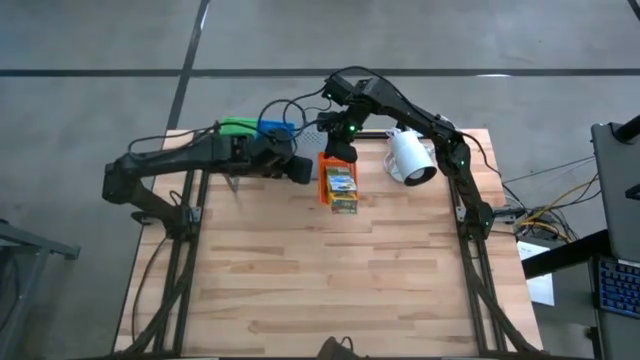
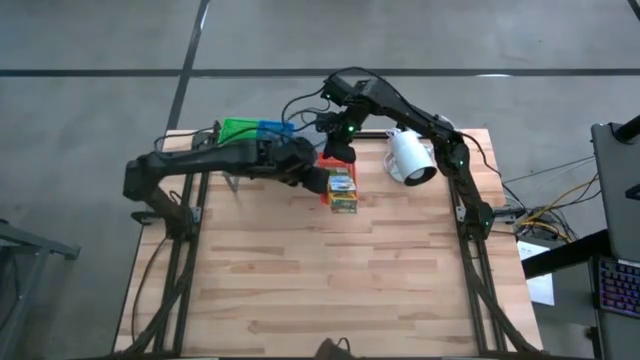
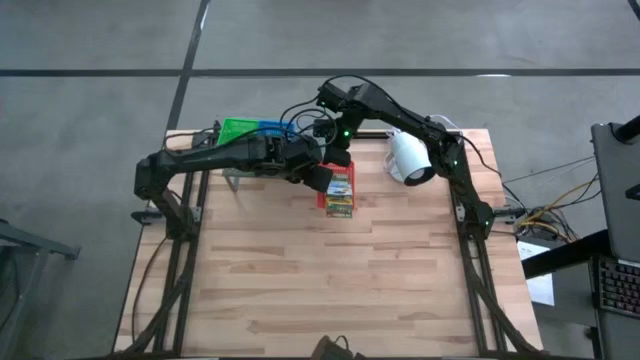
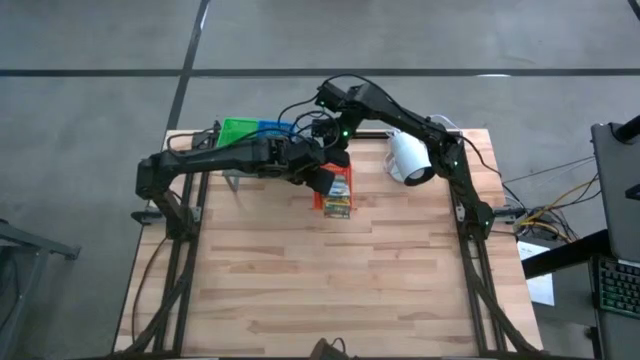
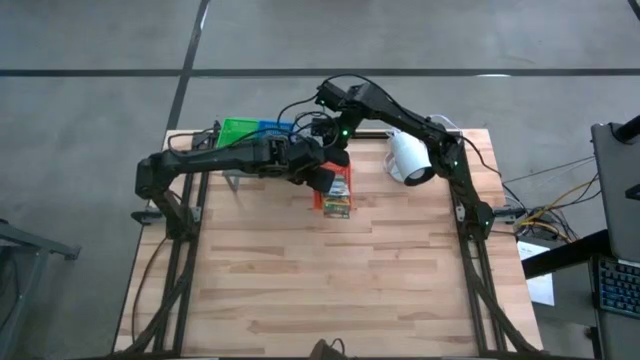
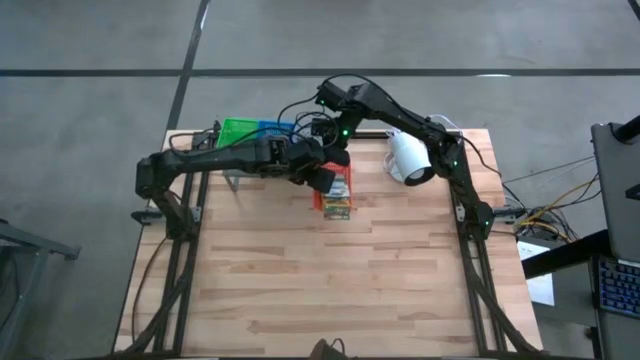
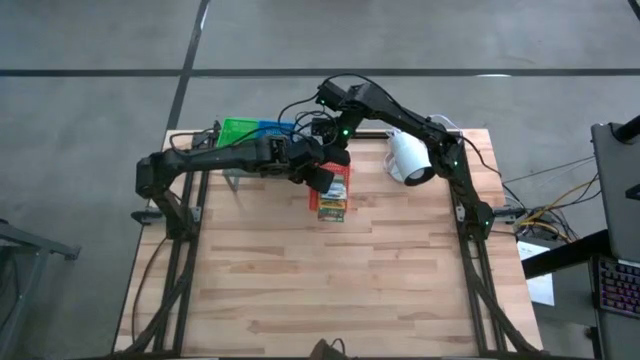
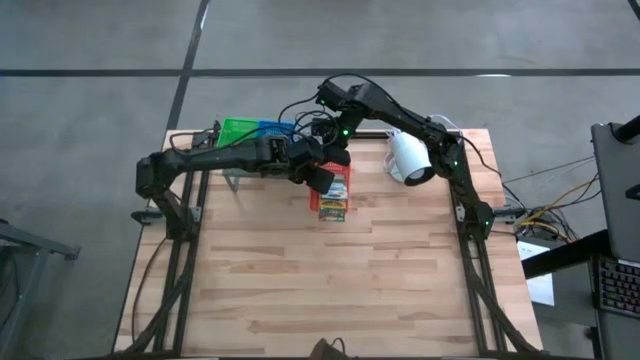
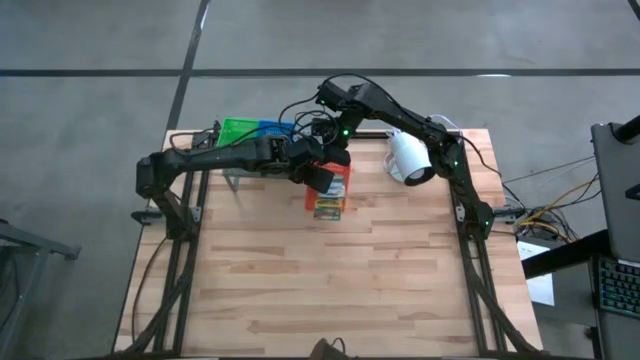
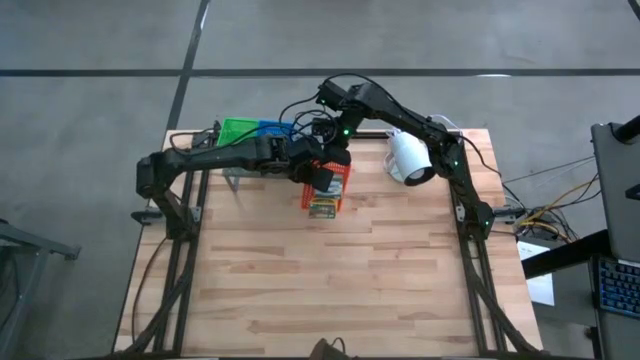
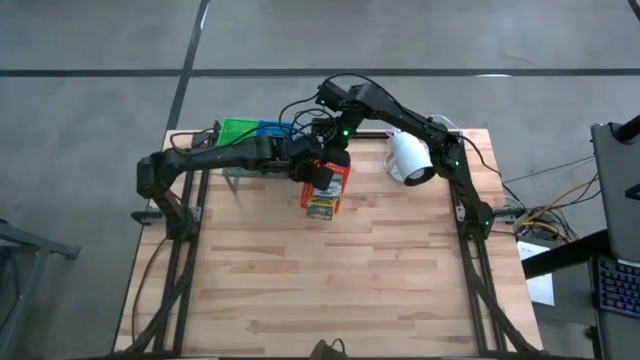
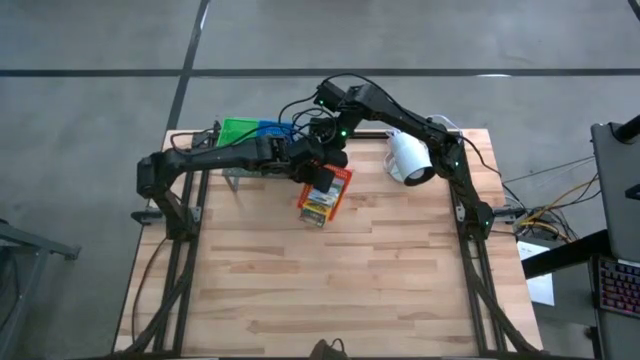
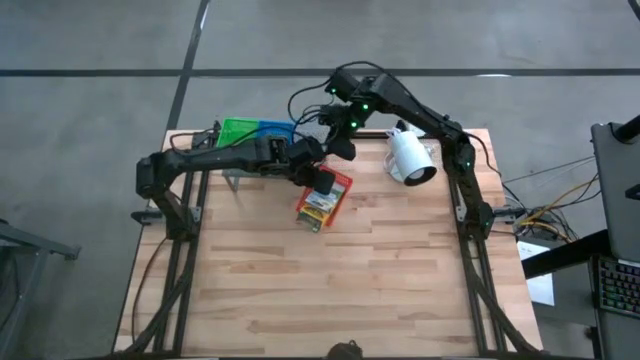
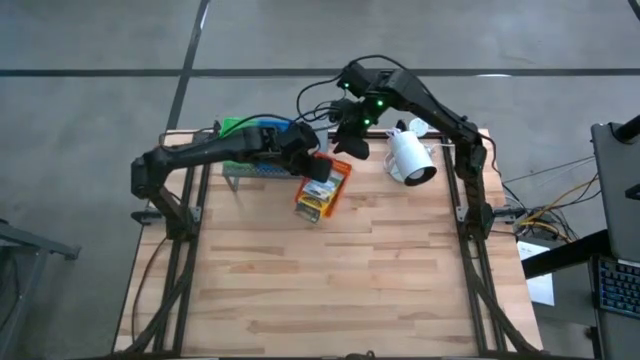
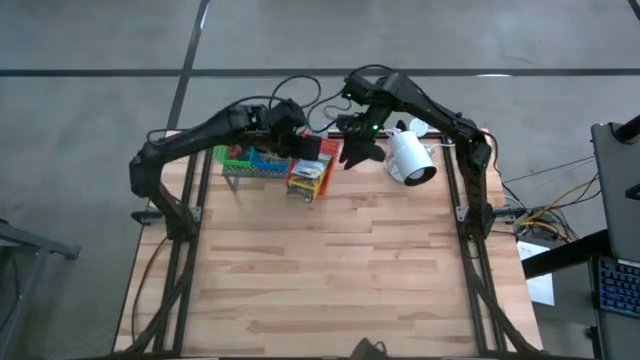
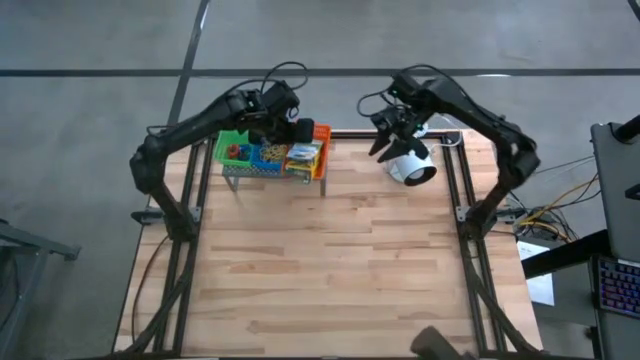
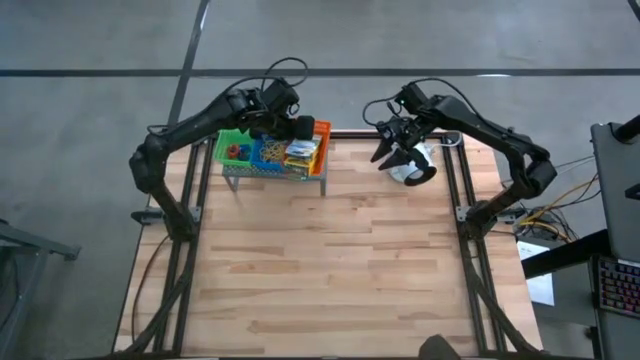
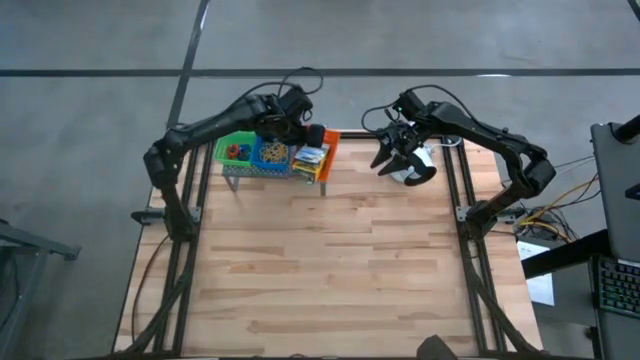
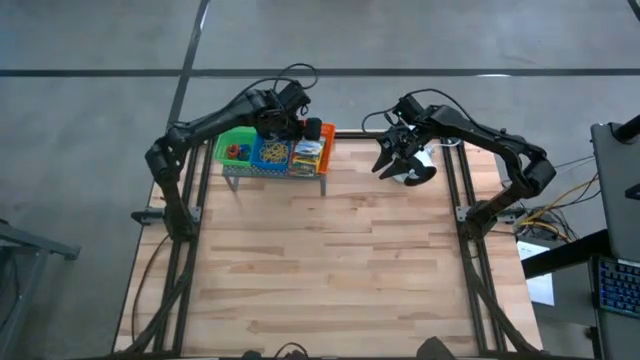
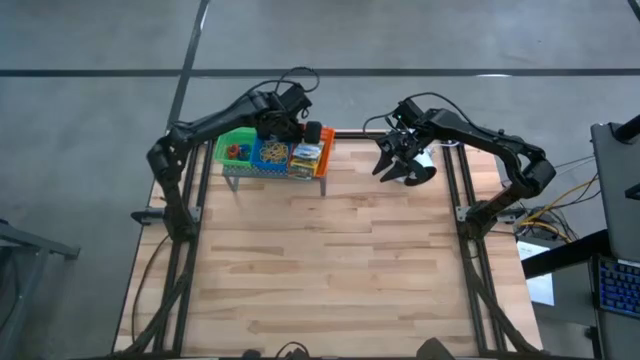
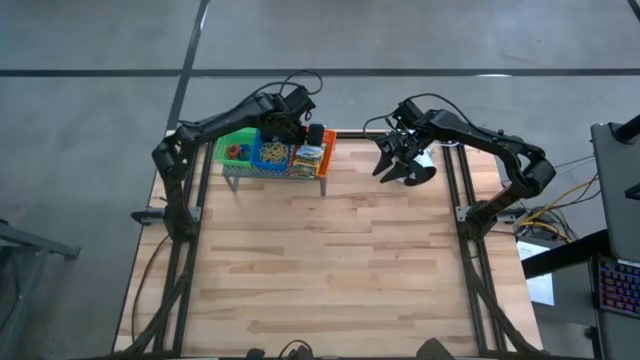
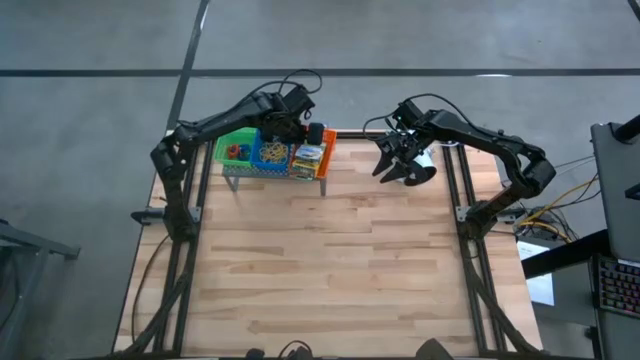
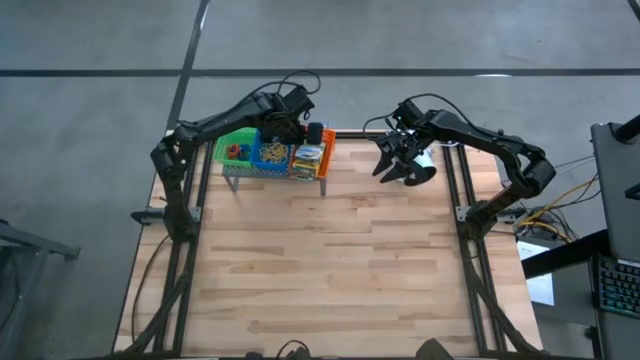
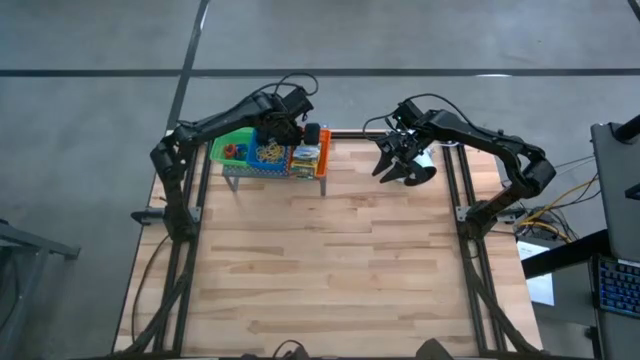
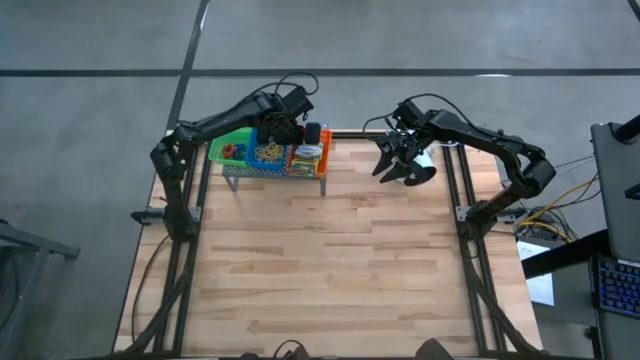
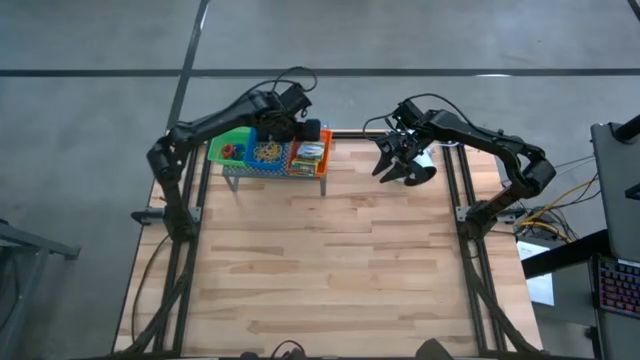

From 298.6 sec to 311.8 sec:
Task: Pick & Place Office Desk Supplies
Put the orange bin on the shelf

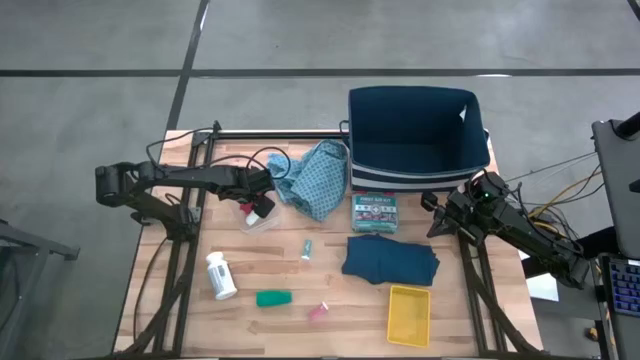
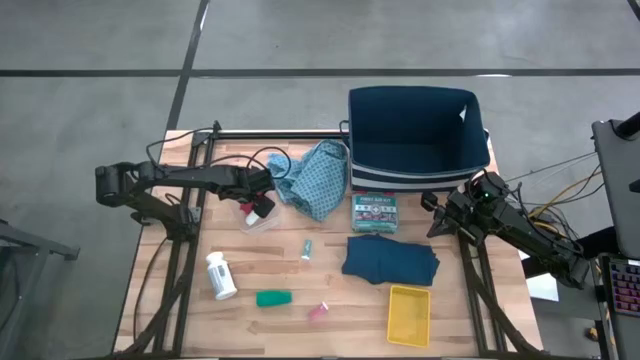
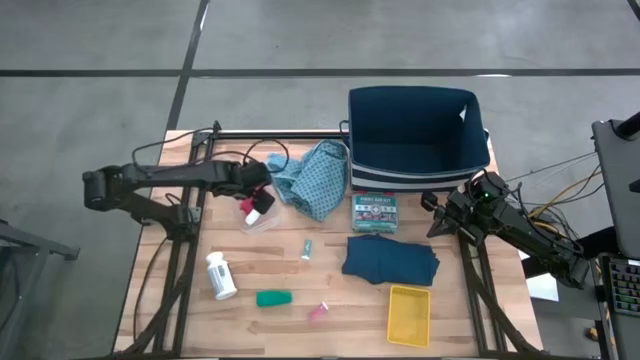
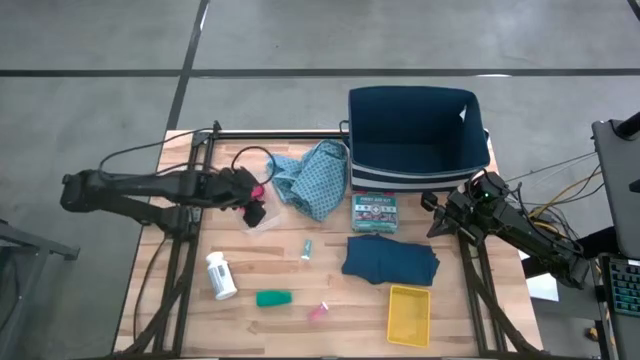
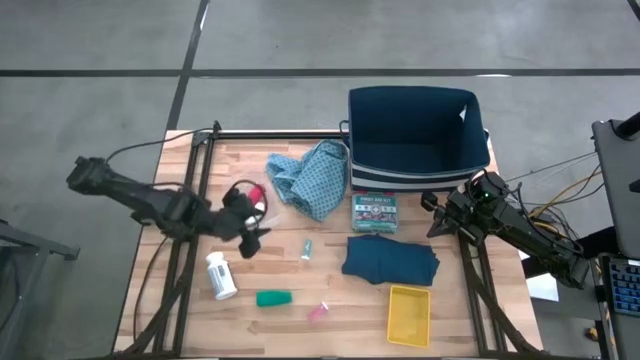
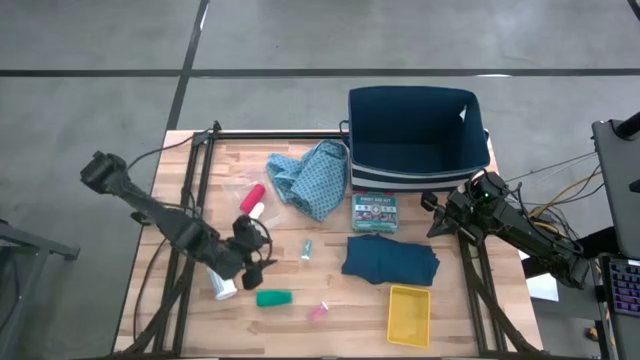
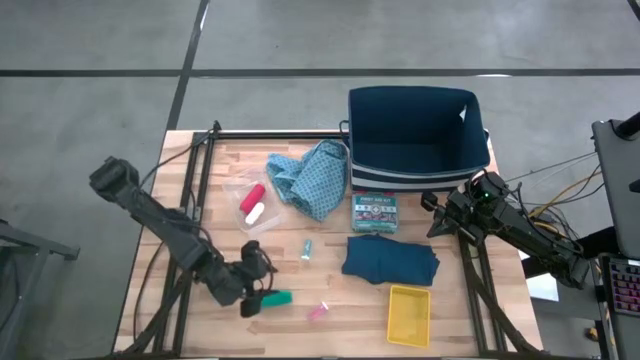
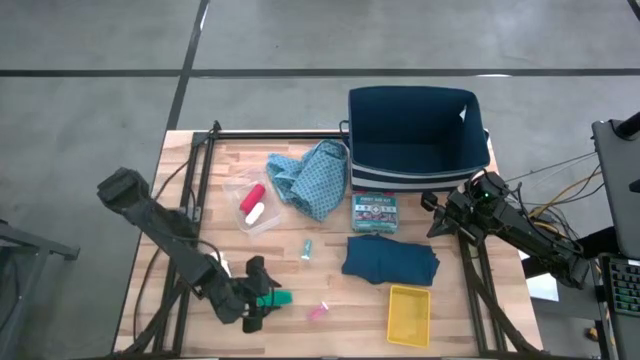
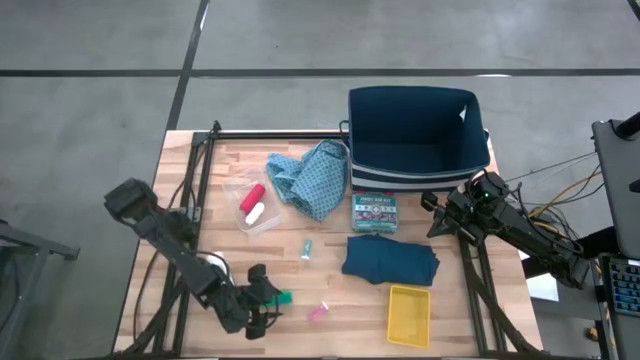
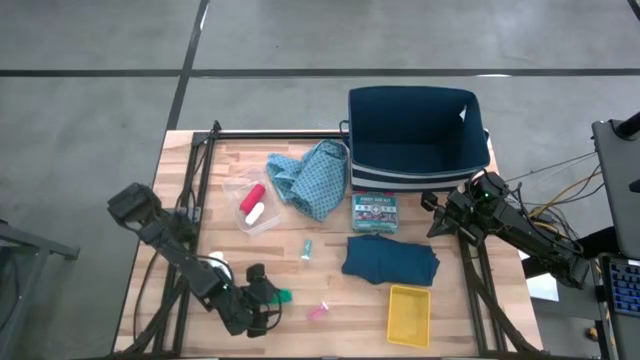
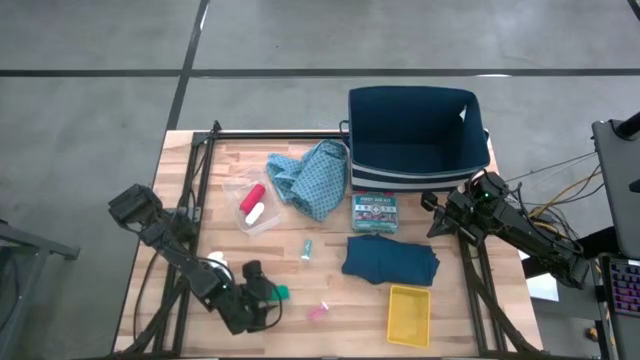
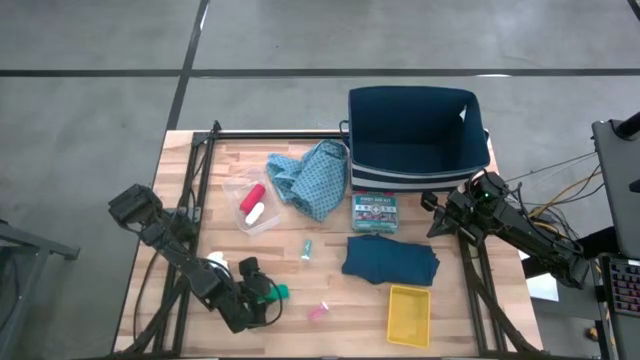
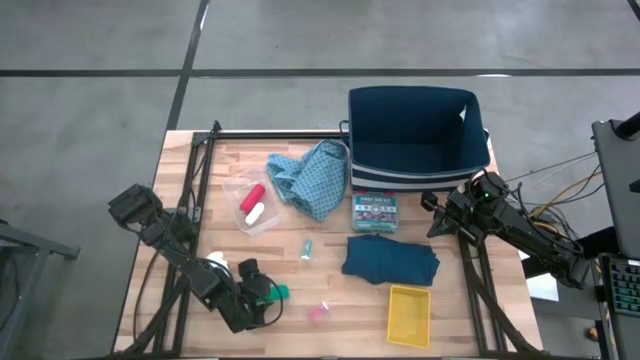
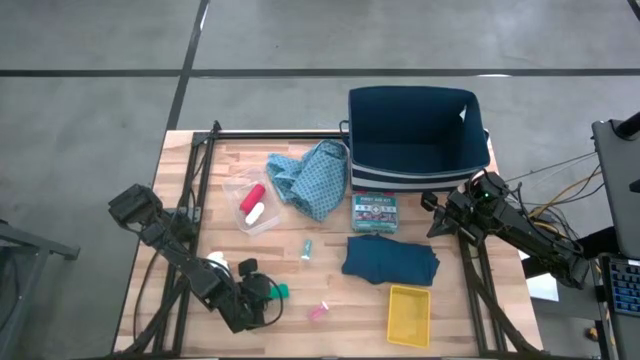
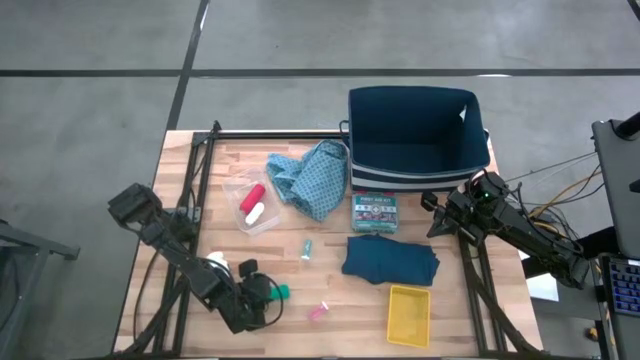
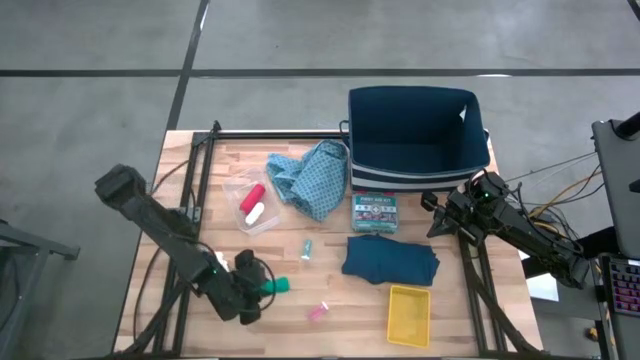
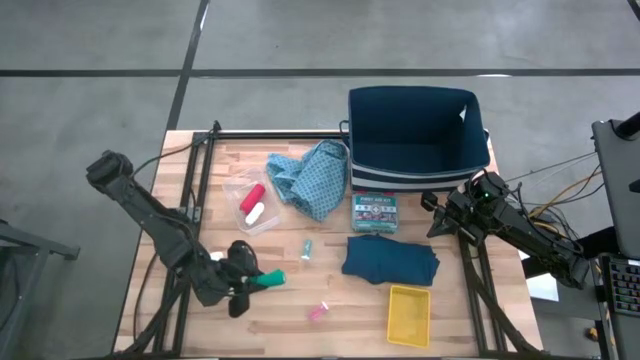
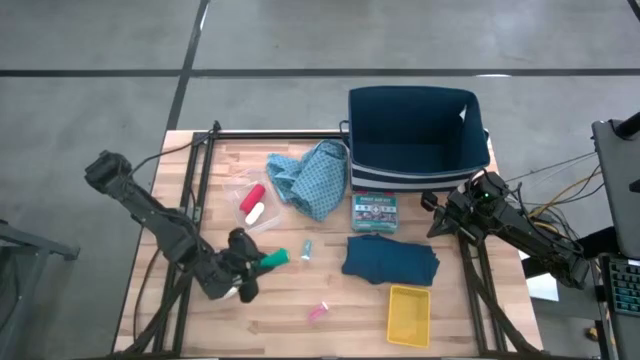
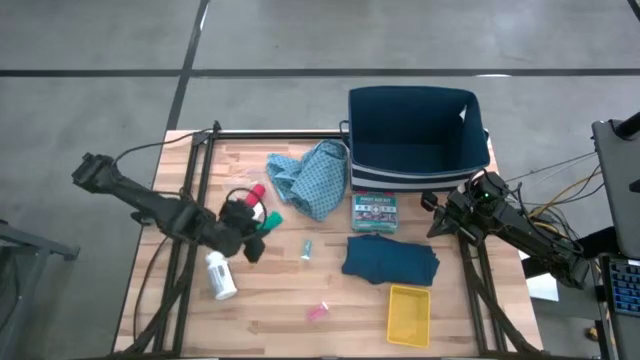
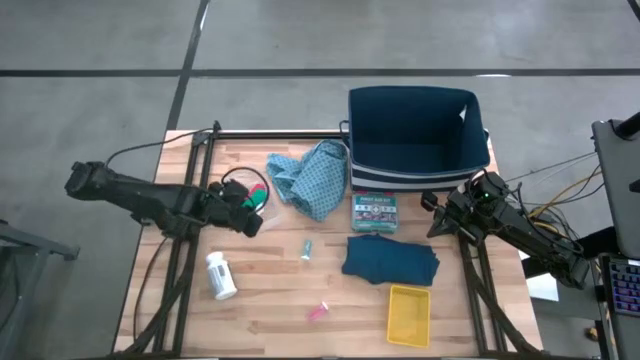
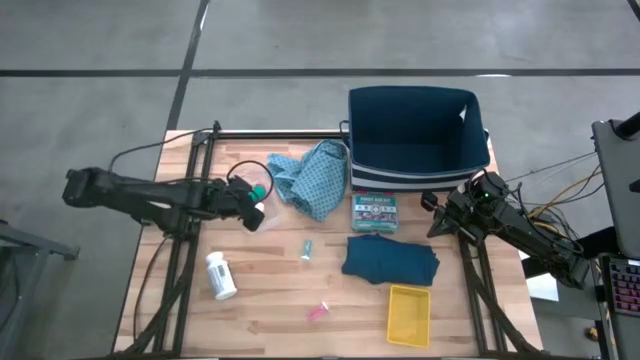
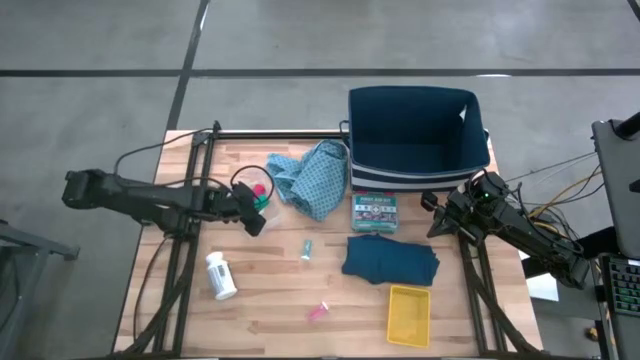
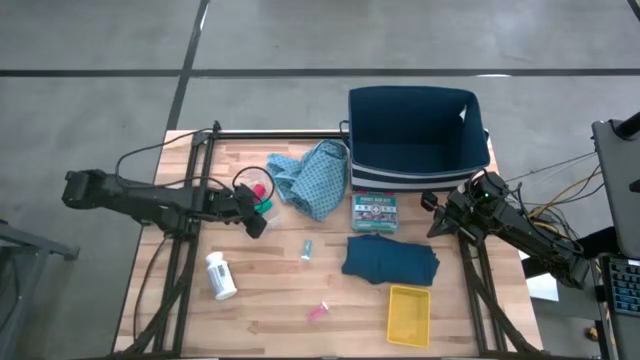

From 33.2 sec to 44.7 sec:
Task: Pick & place medical supplies in basket/bin
Put the green bandage into the transparent bin
